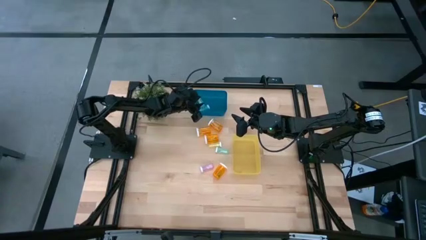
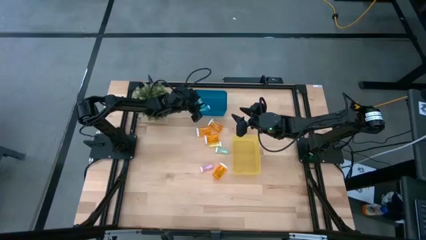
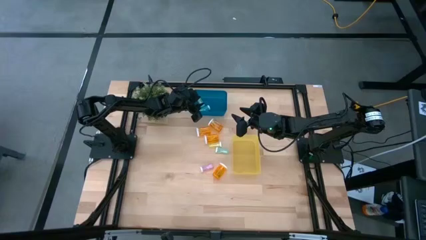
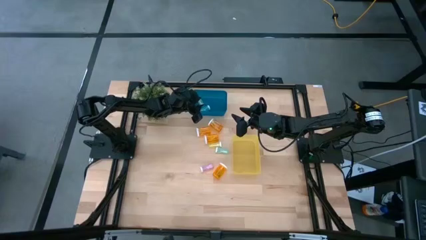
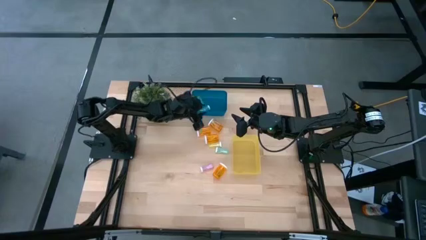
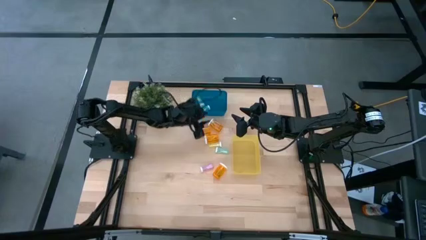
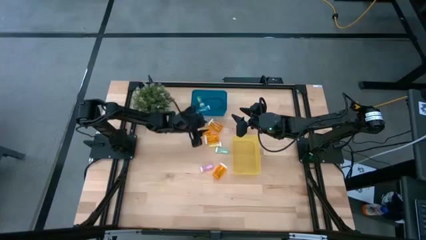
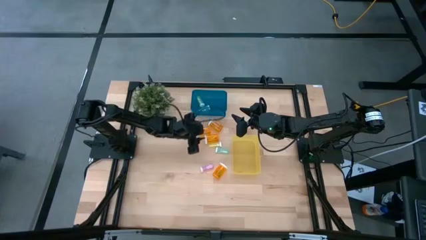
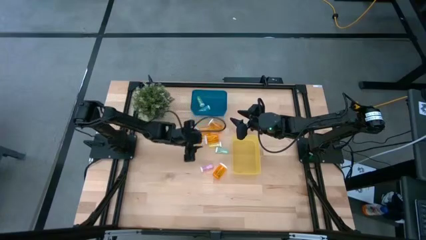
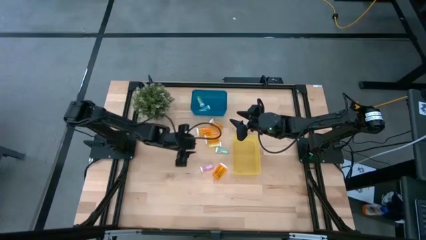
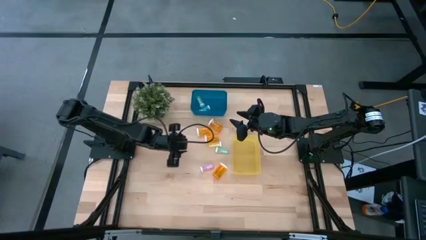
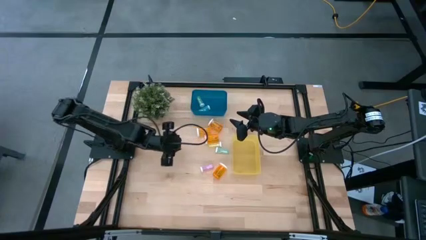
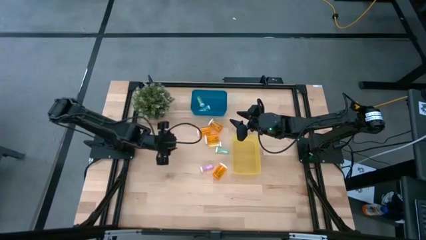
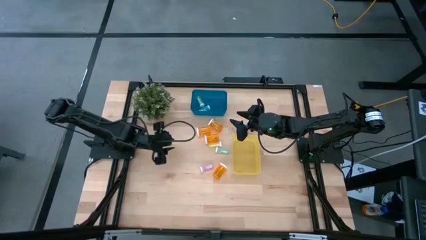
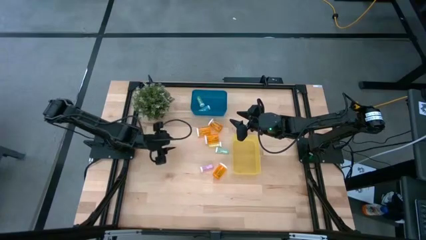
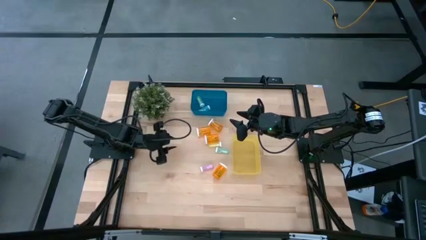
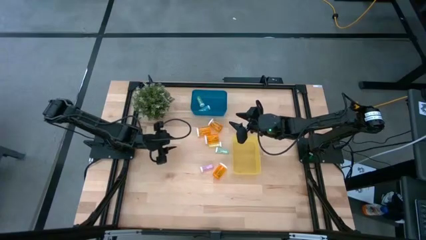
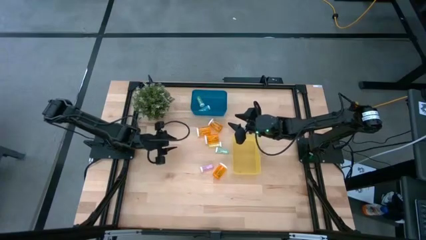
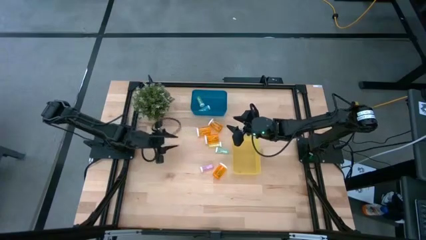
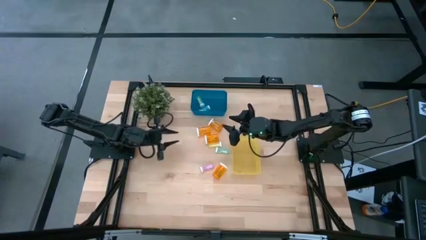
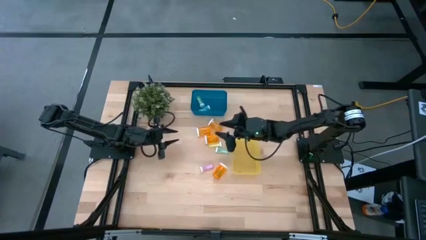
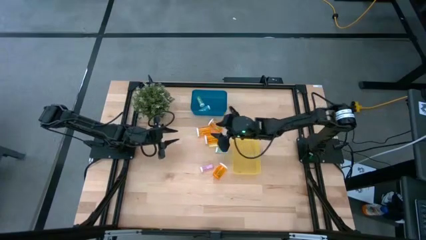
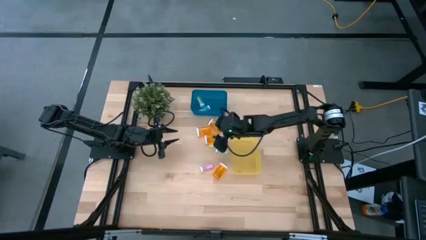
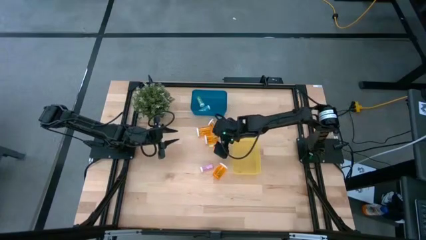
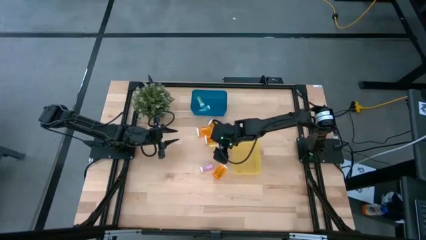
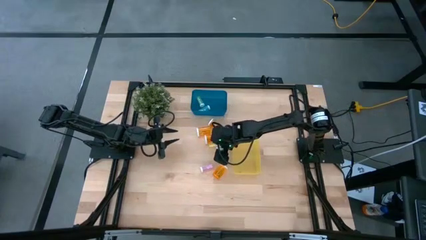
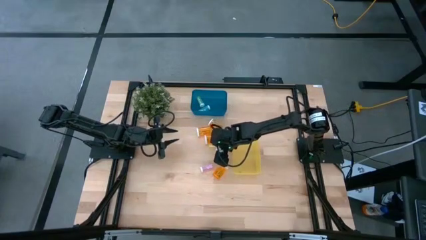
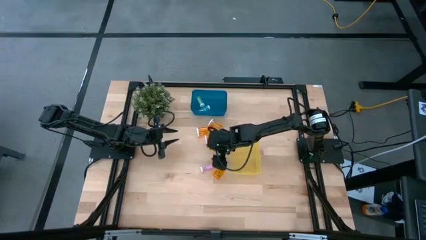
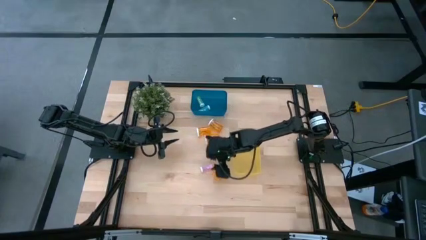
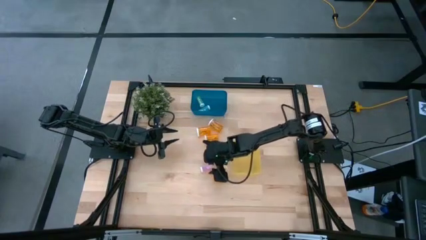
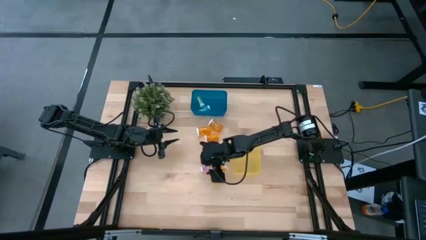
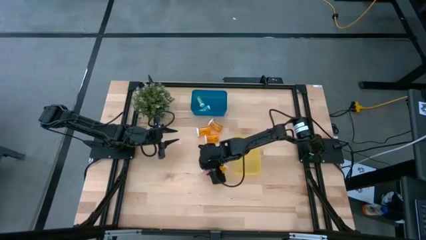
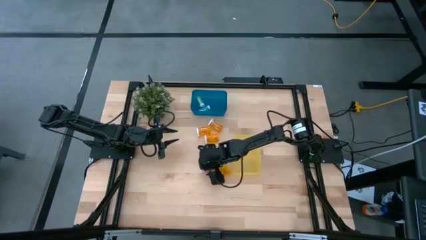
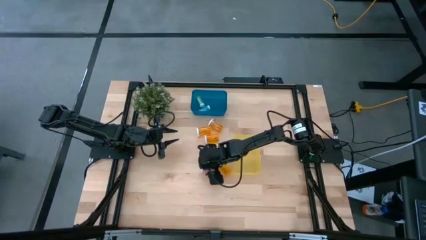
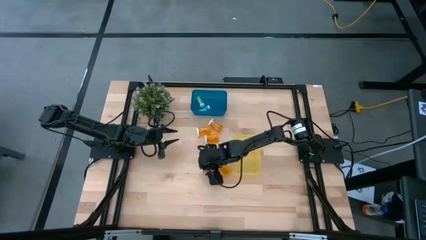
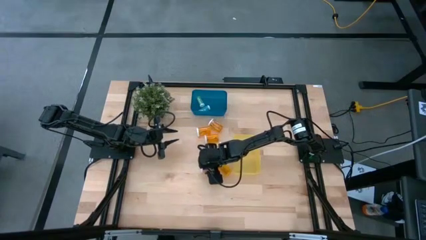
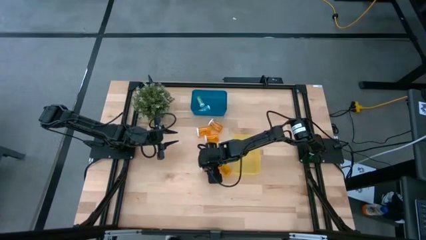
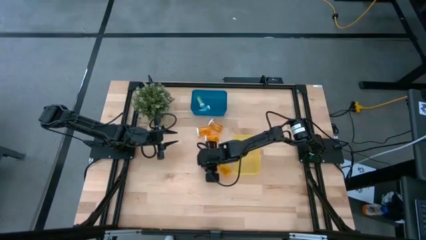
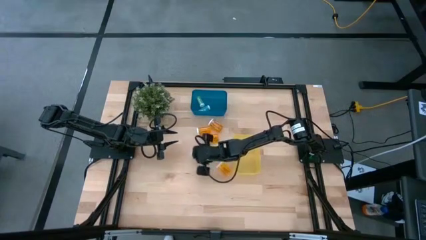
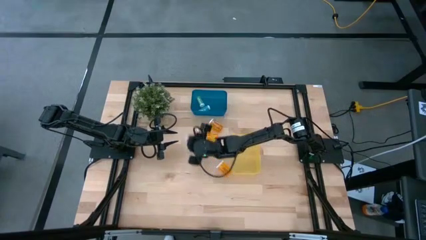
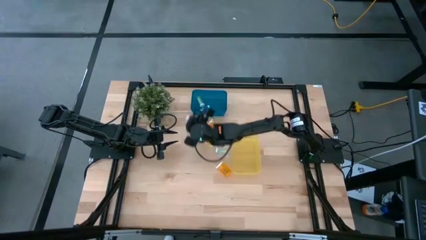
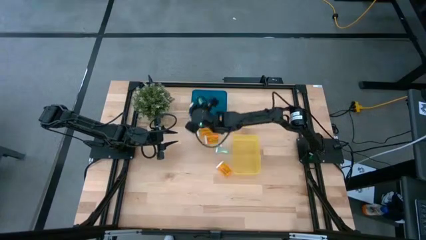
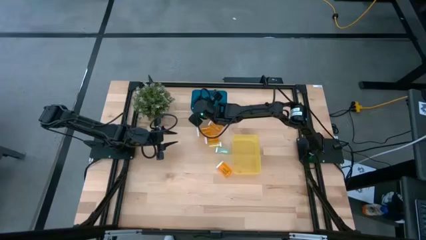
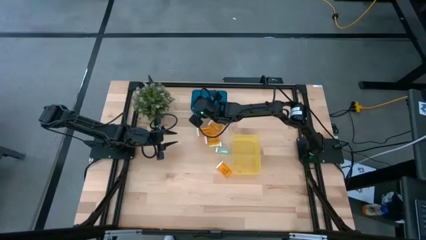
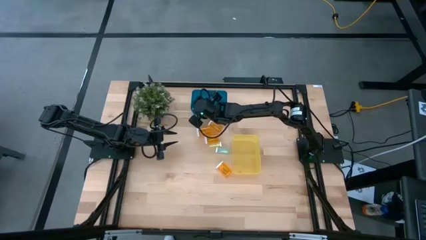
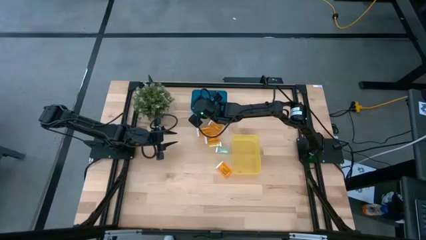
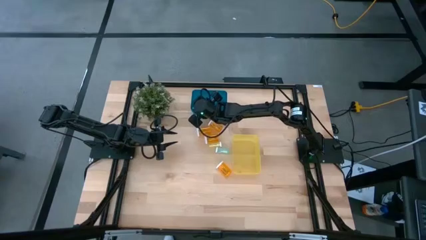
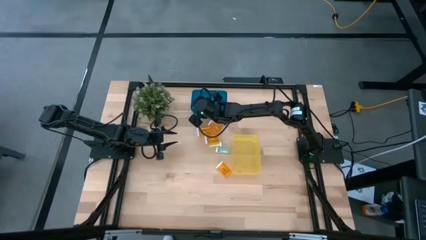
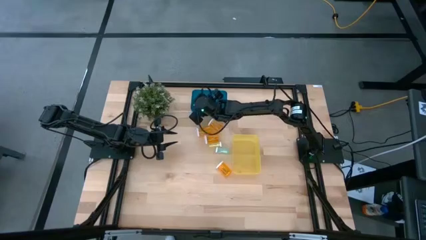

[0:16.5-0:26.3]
Task: Pick and place medicine bottles into bin by pill shape (circle, oval)
Put the small pink pill bottle into the blue bin

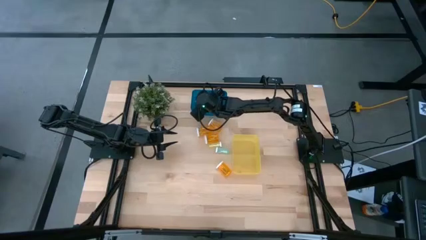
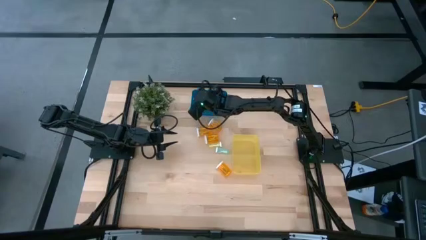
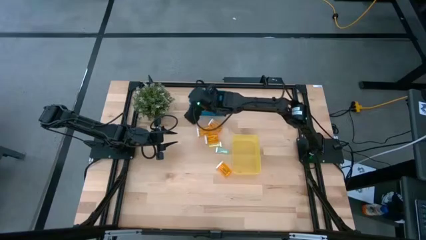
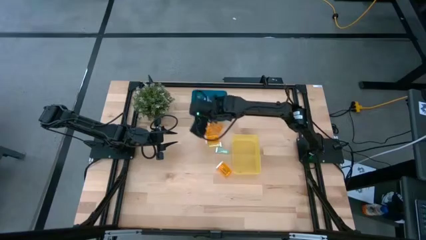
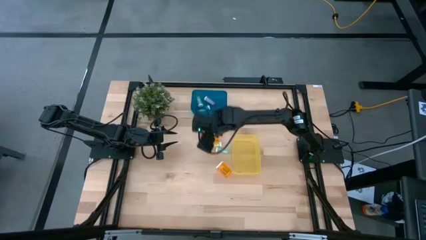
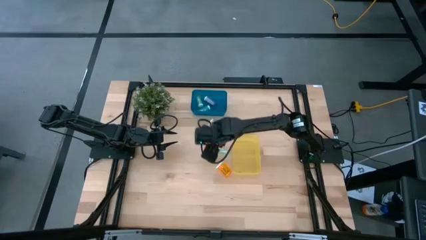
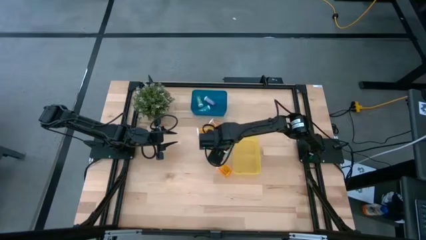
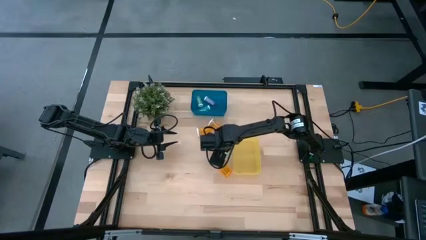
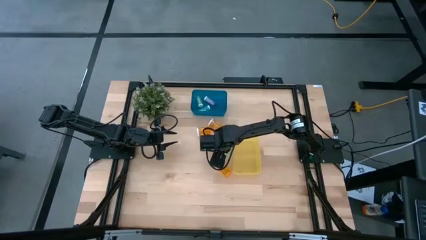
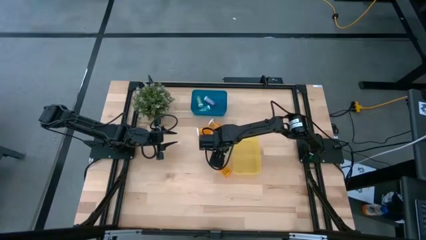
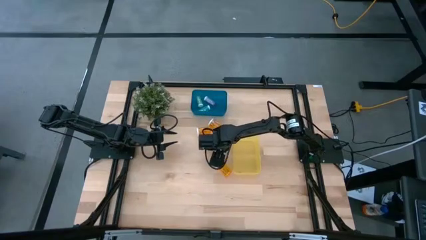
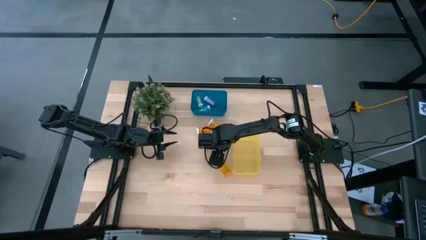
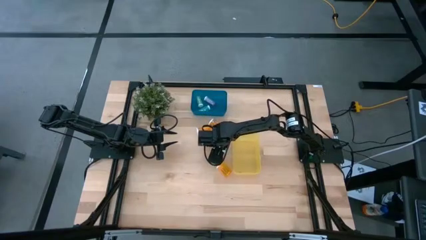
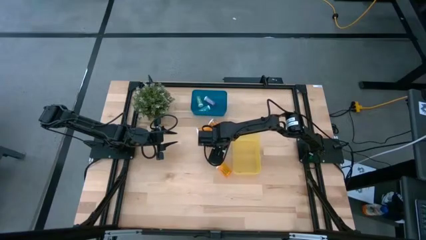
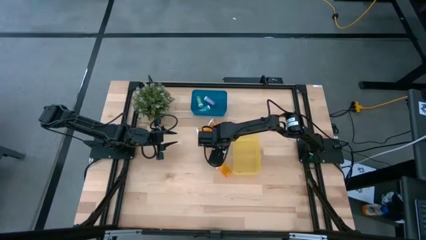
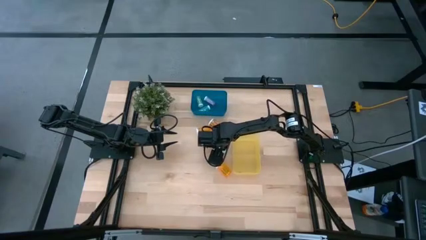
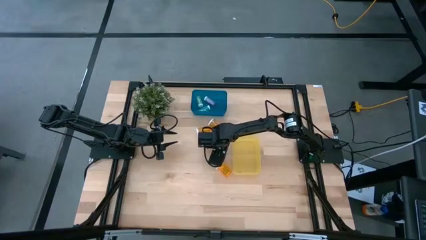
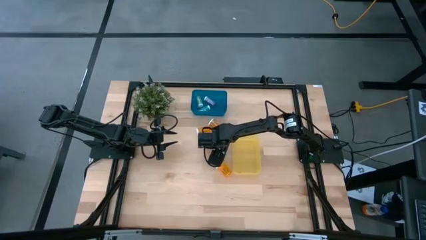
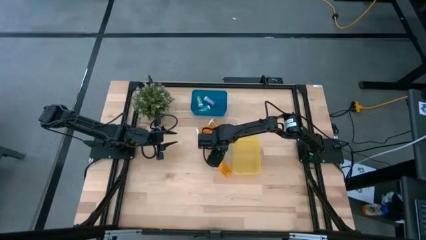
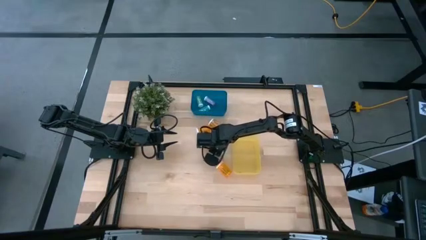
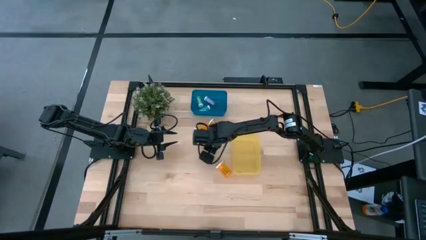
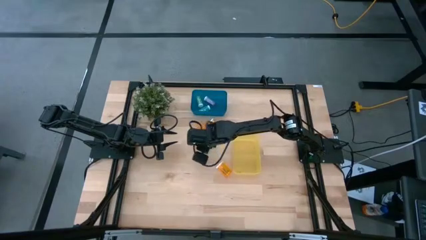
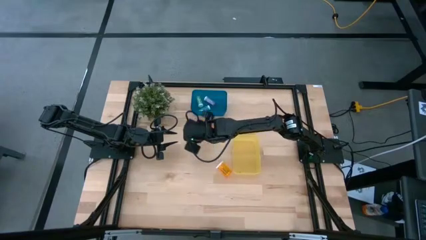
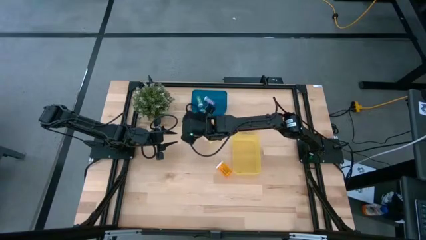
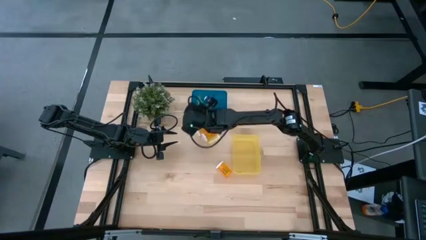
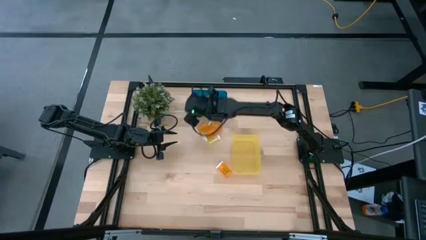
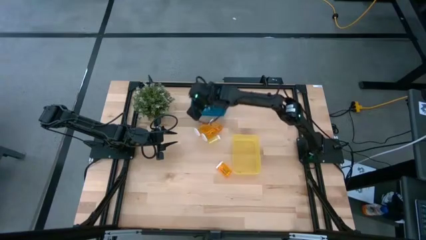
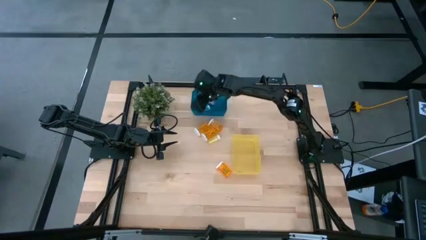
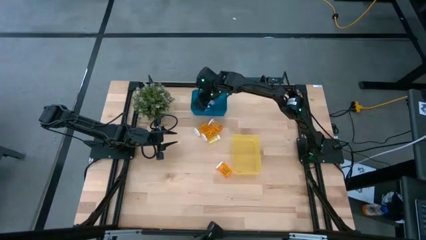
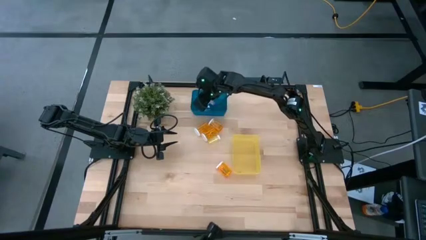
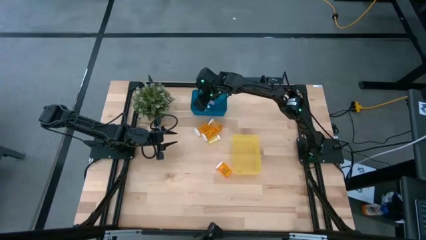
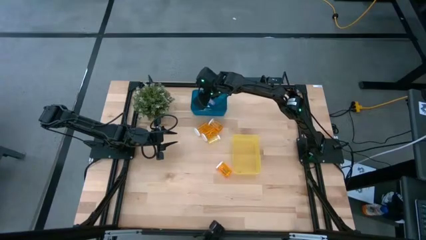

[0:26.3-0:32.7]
Put the small blue pill bottle into the blue bin
